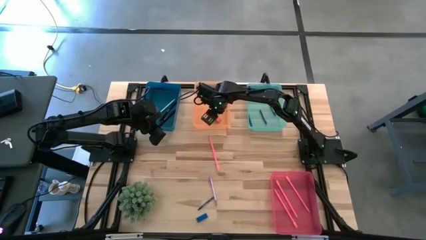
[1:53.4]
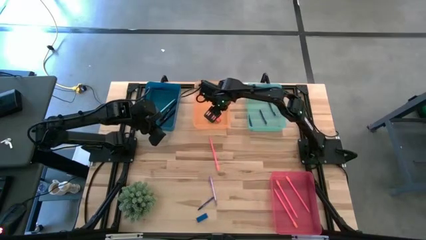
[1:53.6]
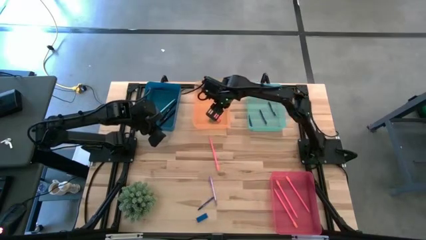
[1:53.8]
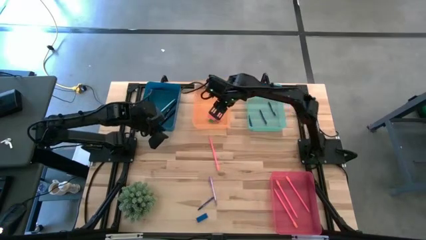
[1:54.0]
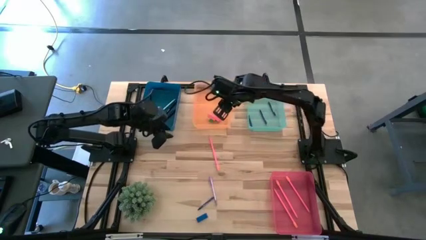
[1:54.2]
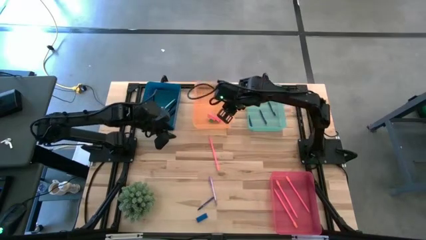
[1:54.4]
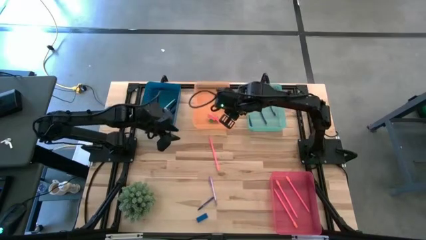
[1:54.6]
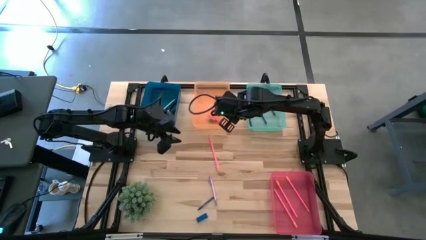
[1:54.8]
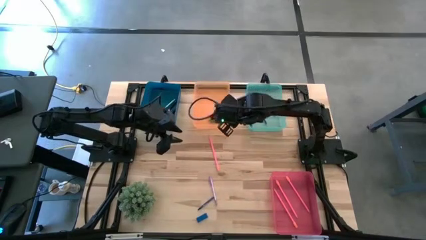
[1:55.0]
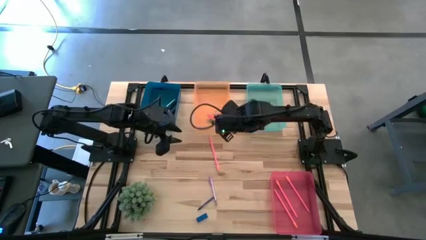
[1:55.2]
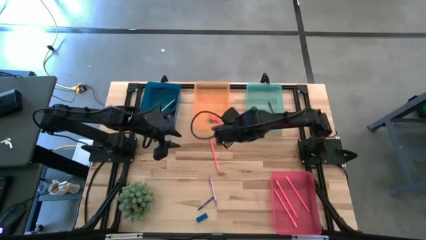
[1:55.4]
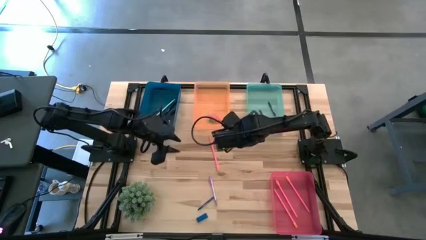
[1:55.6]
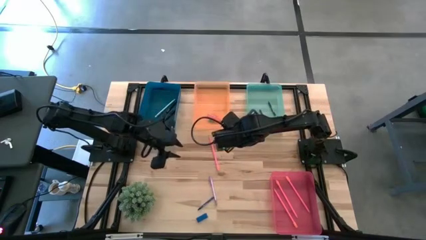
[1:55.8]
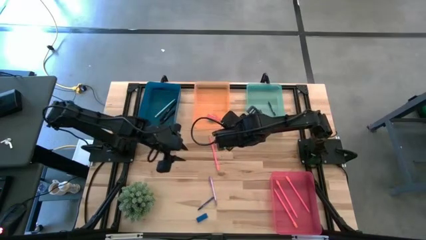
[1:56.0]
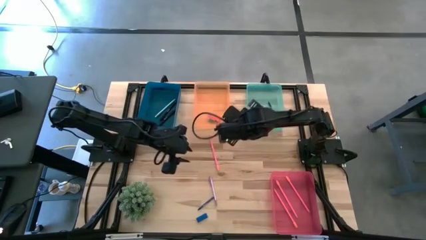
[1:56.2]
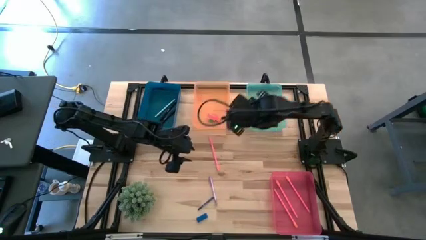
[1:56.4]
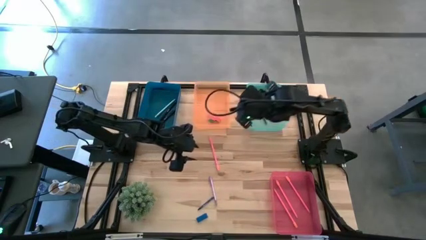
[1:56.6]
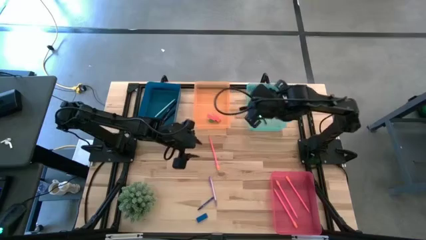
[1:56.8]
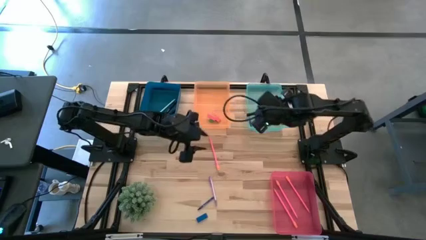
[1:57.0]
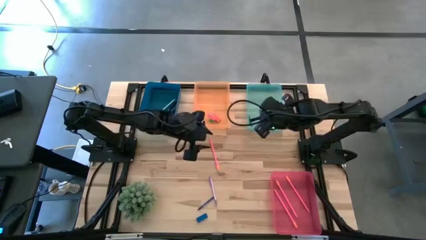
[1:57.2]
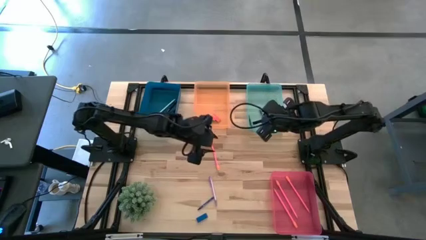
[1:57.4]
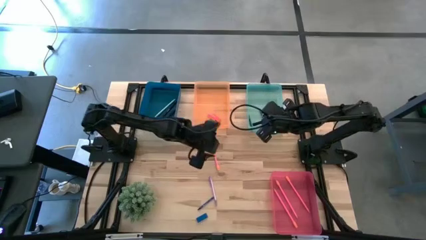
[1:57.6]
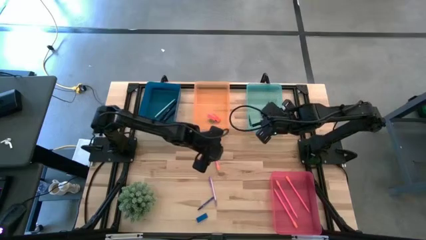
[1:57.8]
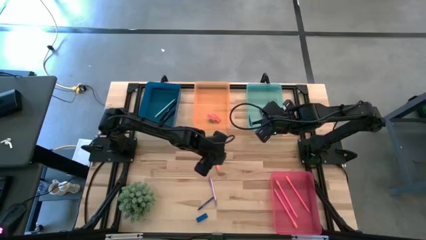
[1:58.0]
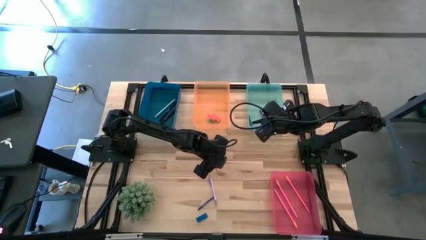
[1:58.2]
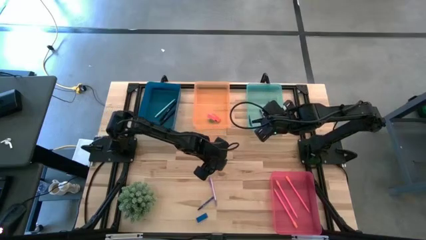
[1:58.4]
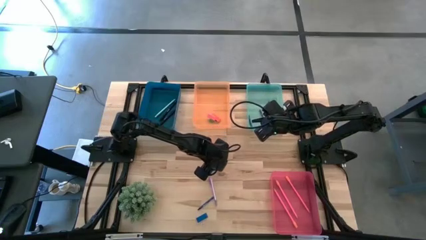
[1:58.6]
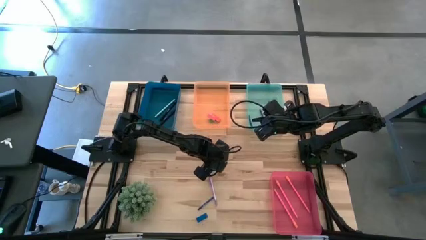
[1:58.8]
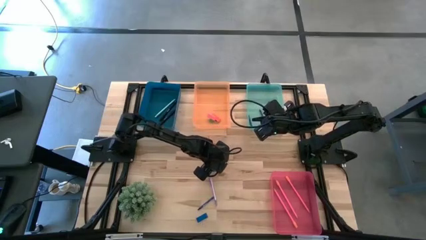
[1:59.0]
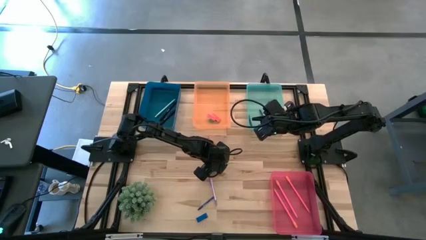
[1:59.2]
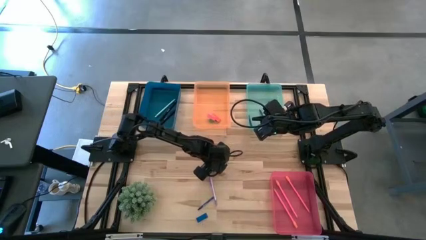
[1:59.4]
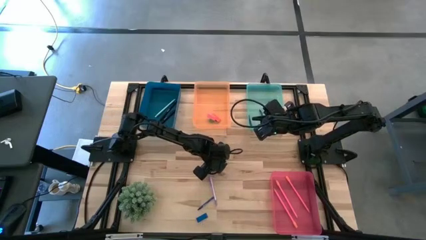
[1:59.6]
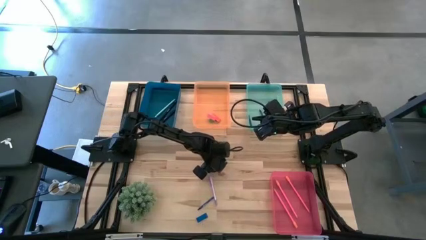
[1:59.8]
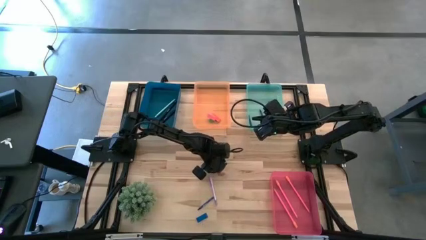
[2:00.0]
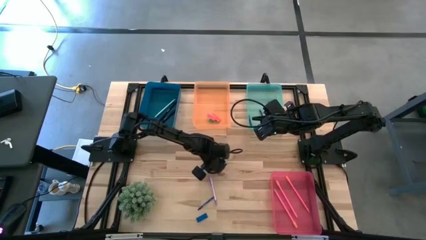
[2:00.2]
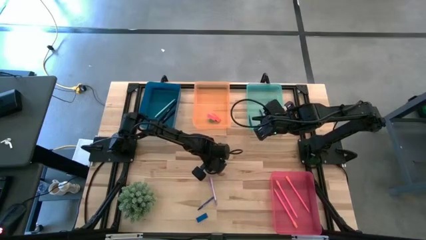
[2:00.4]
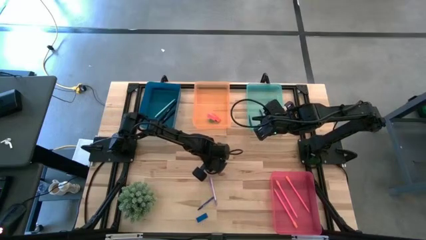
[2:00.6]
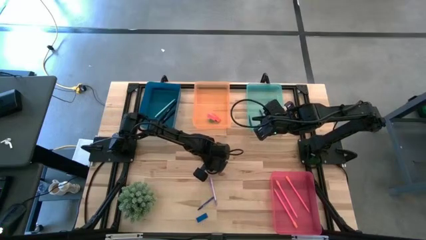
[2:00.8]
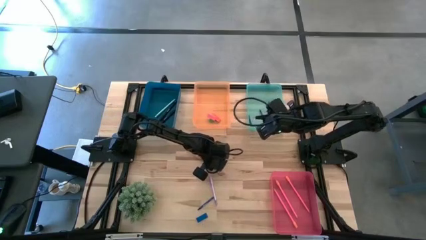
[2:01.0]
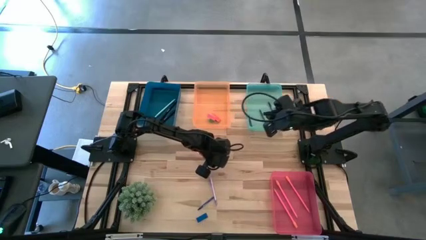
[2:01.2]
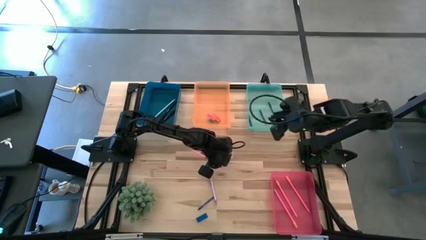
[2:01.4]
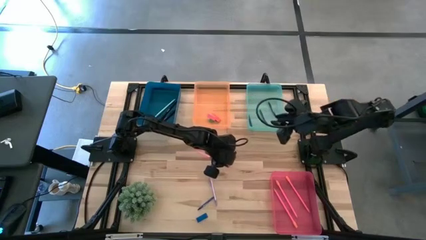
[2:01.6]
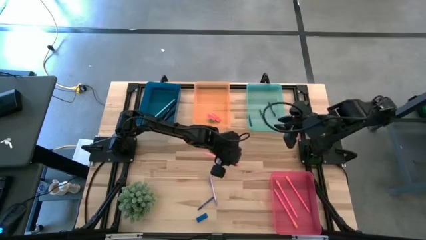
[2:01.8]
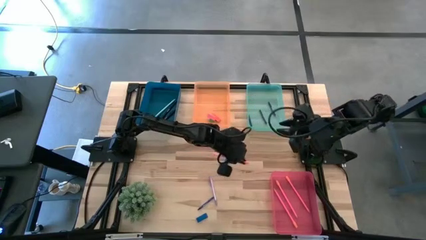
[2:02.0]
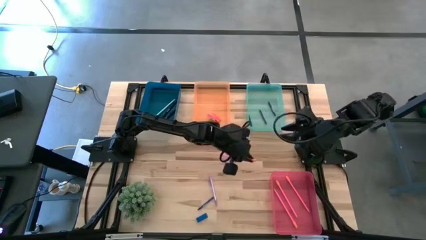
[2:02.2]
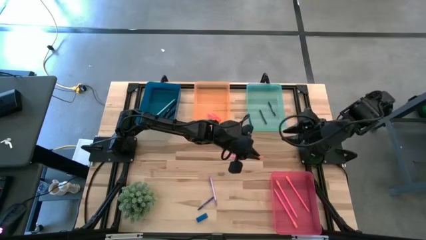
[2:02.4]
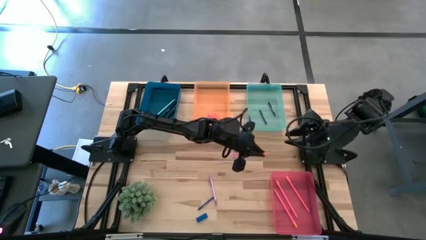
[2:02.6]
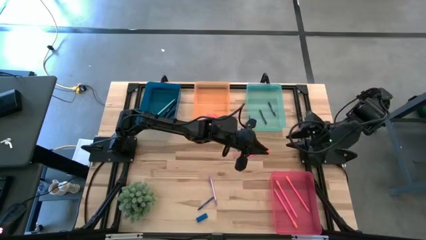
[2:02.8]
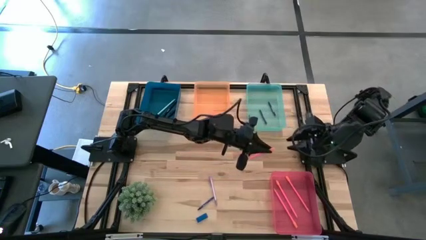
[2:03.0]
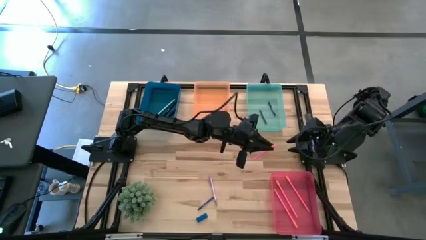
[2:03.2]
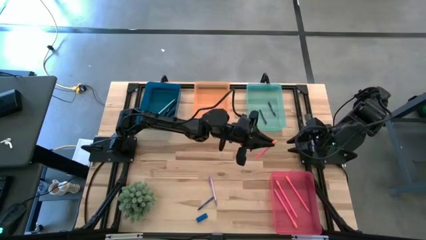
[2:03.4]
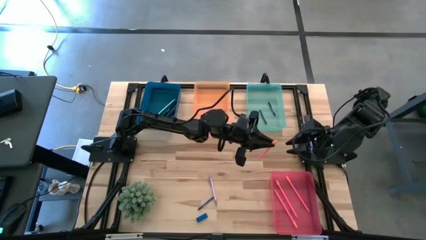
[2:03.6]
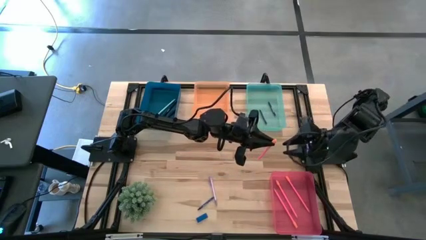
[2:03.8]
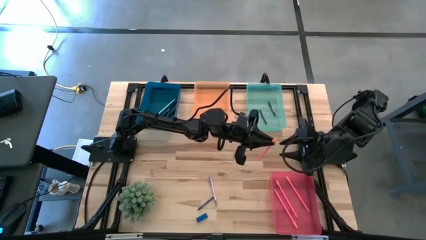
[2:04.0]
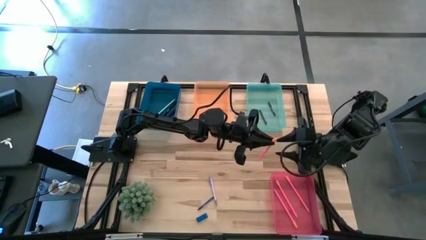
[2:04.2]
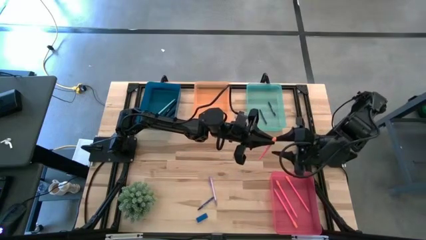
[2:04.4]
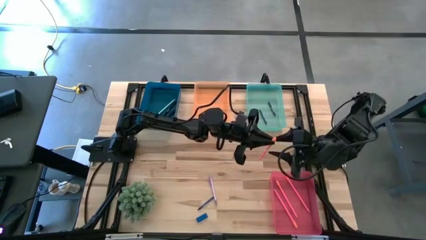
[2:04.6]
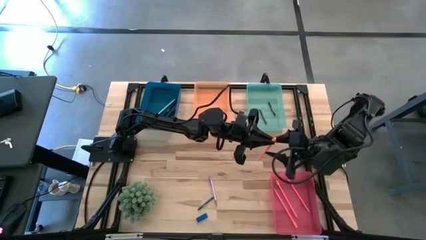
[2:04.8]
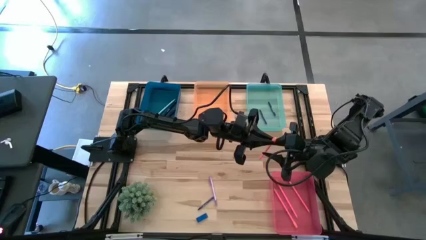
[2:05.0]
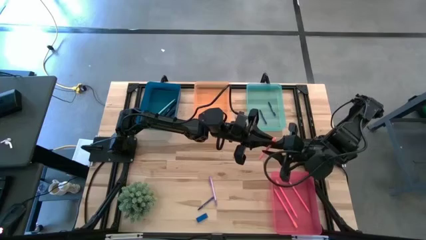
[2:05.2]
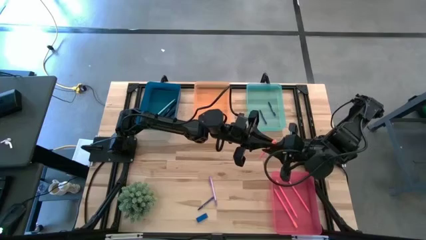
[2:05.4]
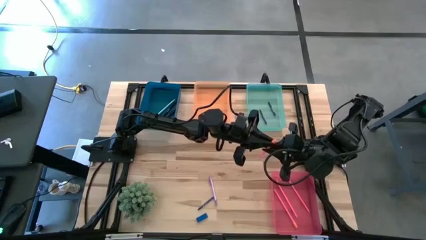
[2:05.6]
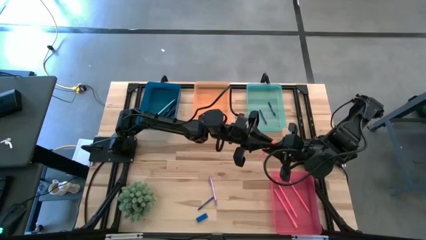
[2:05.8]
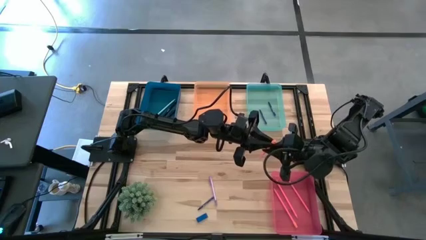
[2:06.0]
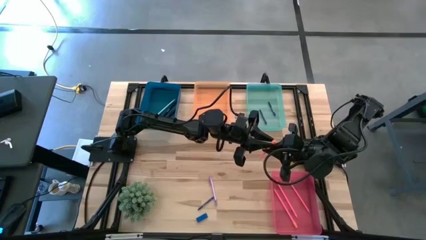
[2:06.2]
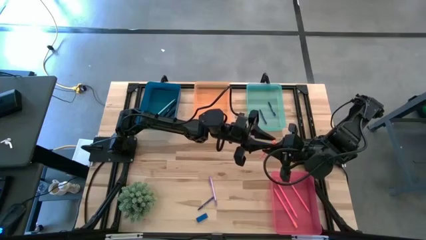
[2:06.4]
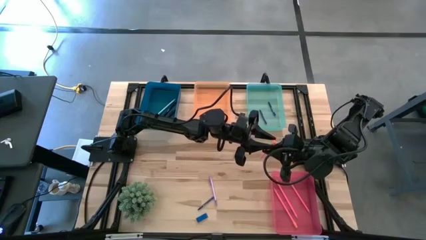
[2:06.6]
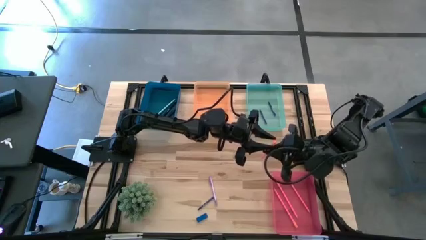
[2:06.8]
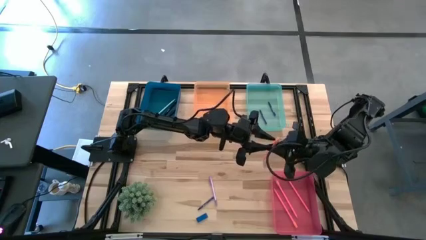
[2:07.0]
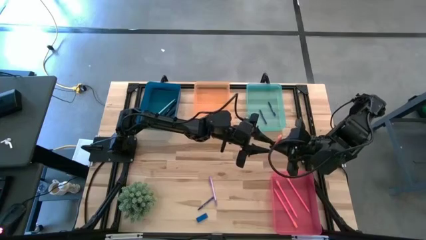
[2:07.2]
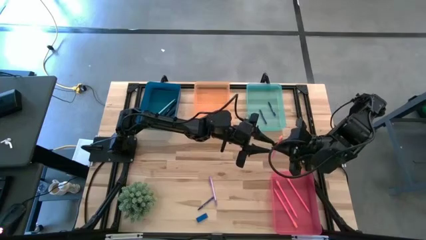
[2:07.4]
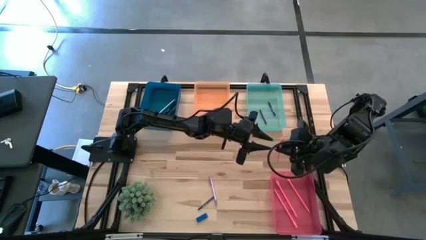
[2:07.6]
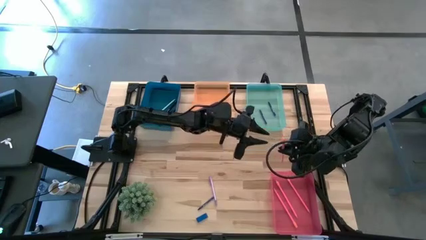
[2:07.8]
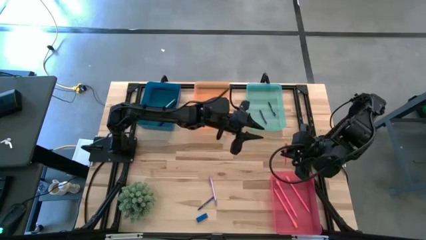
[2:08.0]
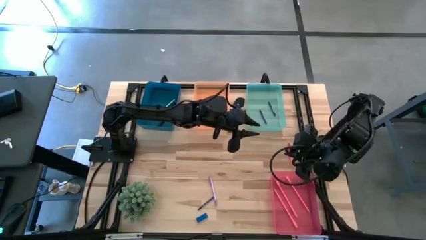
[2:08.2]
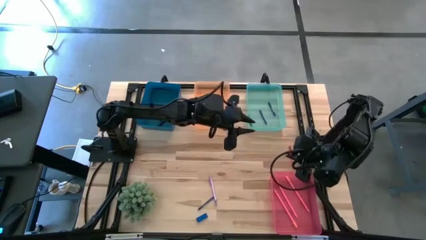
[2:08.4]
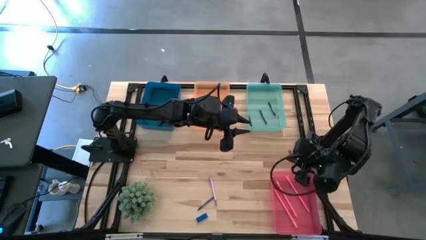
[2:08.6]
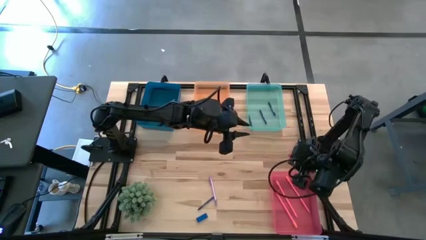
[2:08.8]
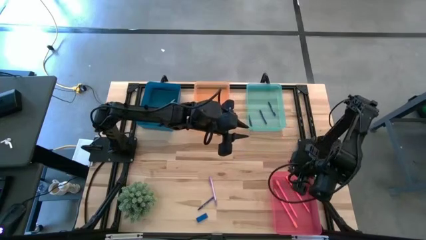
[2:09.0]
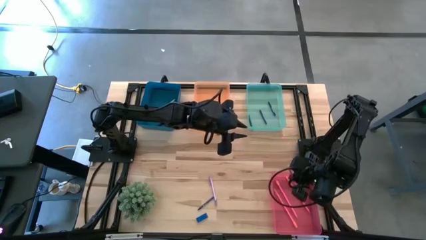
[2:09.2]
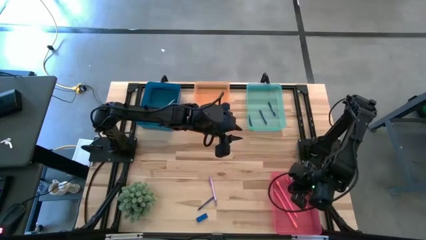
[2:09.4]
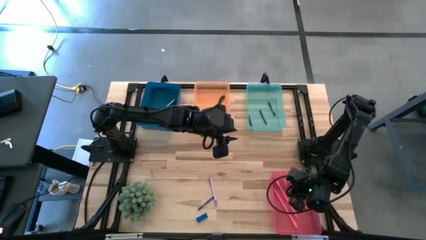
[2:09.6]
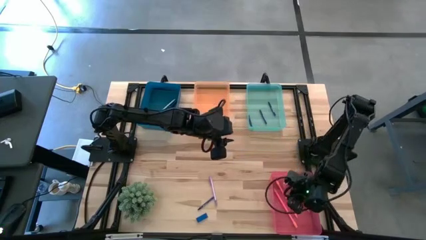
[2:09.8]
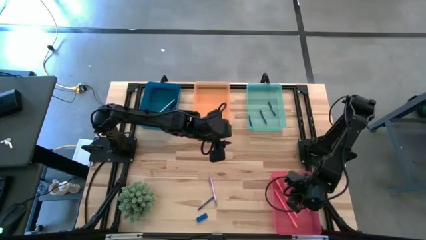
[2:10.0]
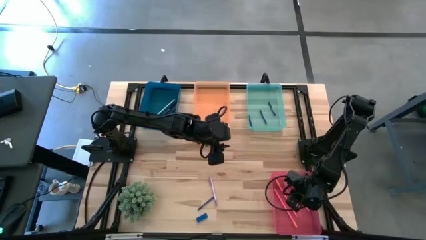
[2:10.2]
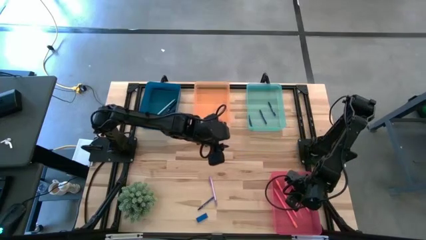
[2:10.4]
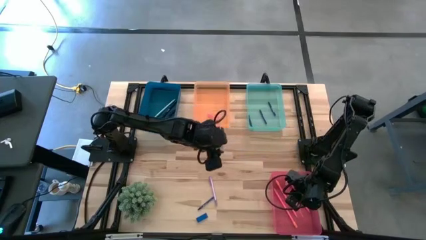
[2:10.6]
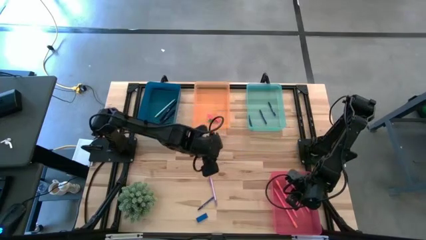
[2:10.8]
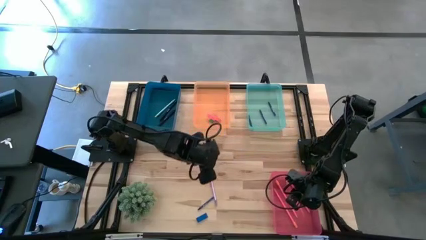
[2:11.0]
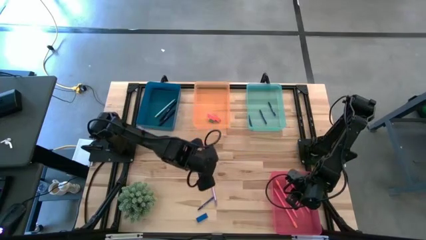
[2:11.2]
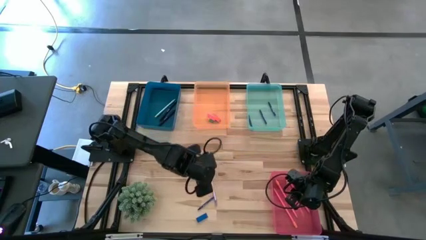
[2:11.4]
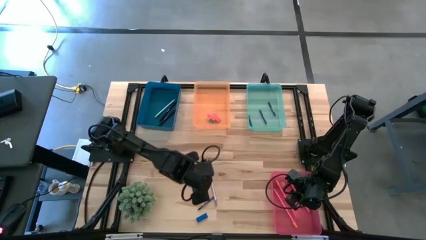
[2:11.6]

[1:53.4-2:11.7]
Task: Sort crayons/erasers/pens/pencils in bins
Put the pink colored pencil into the pink bin
